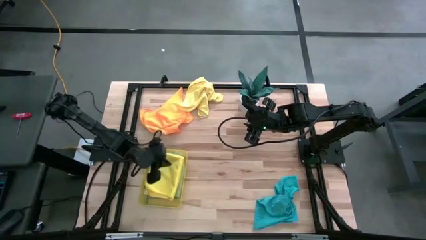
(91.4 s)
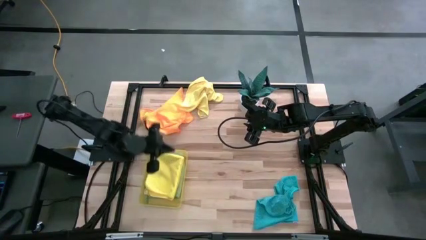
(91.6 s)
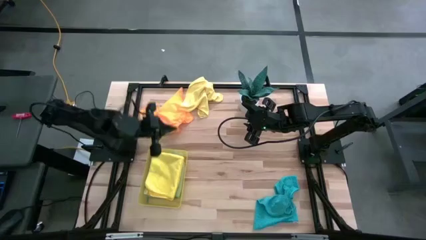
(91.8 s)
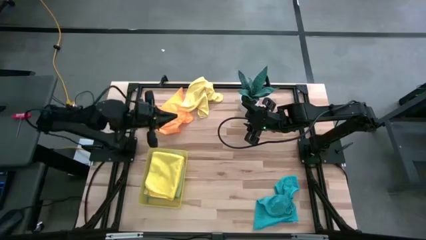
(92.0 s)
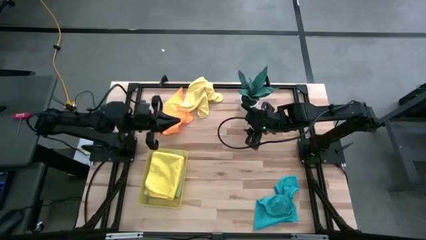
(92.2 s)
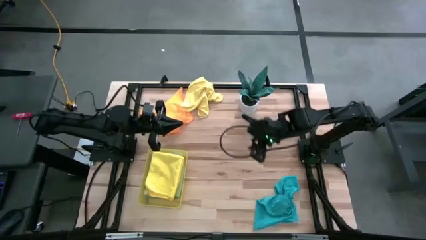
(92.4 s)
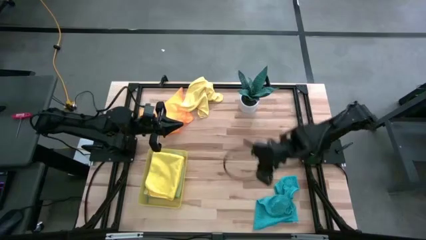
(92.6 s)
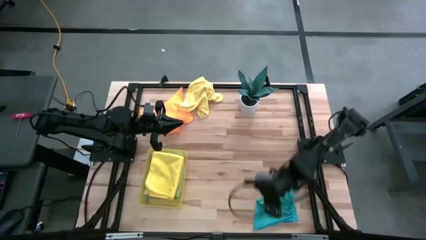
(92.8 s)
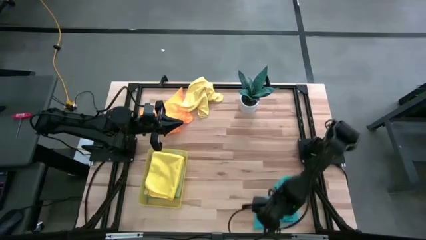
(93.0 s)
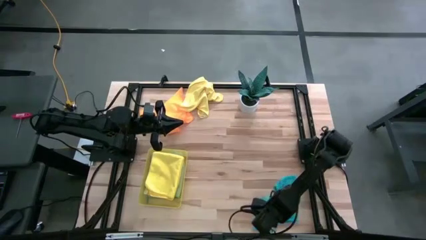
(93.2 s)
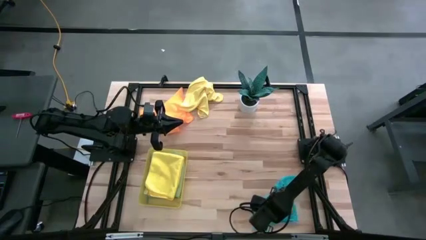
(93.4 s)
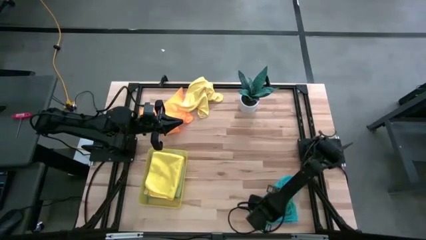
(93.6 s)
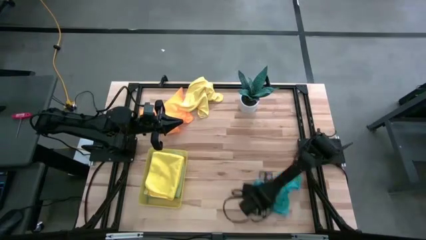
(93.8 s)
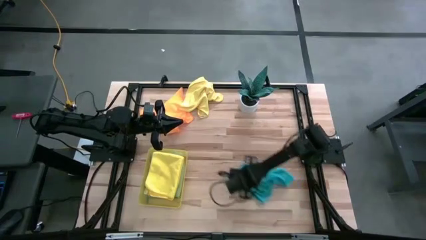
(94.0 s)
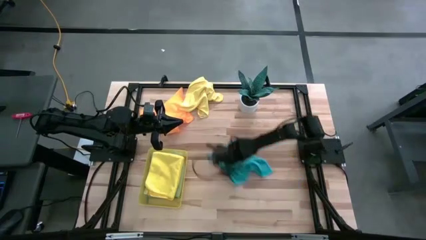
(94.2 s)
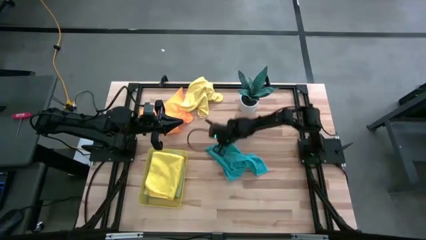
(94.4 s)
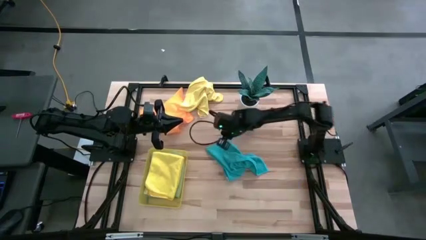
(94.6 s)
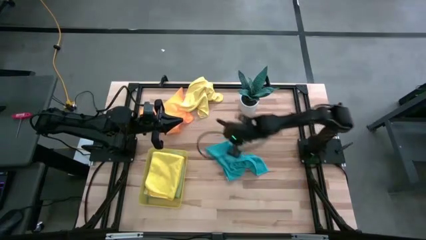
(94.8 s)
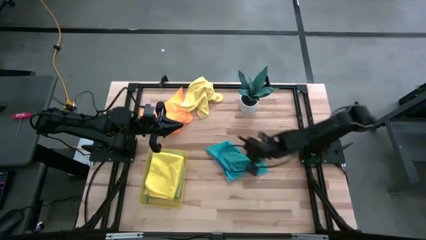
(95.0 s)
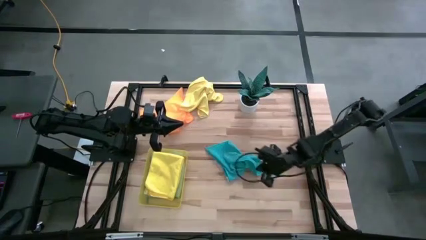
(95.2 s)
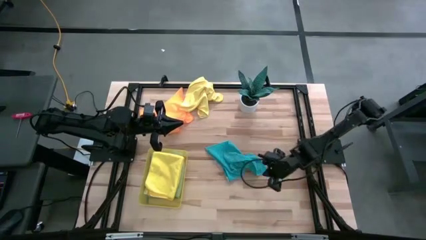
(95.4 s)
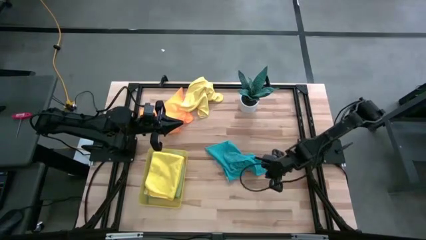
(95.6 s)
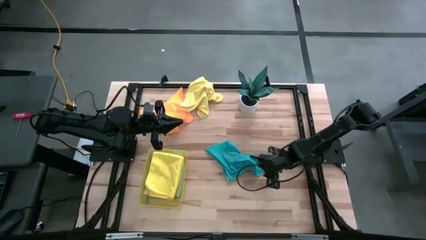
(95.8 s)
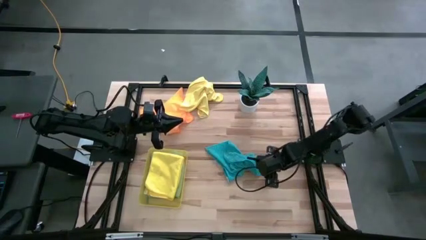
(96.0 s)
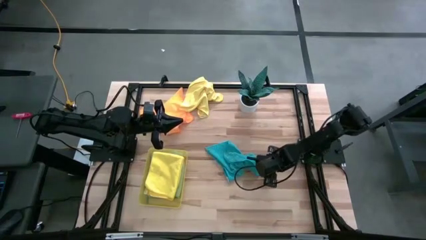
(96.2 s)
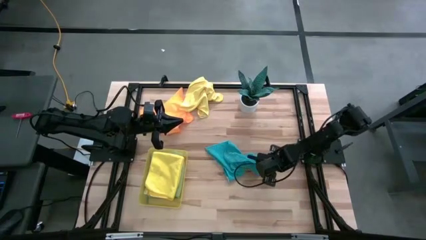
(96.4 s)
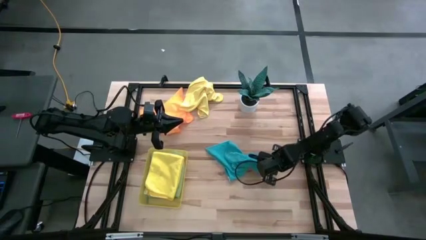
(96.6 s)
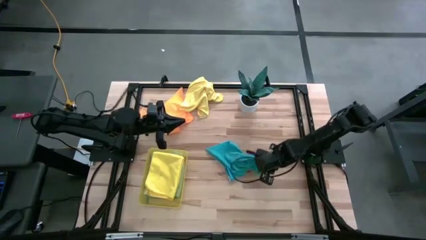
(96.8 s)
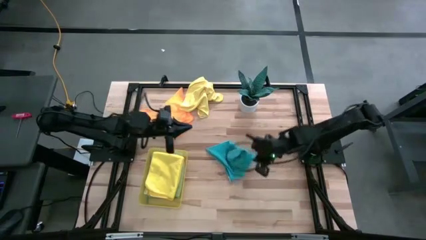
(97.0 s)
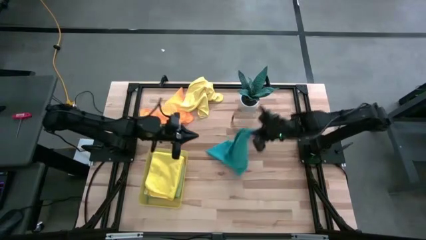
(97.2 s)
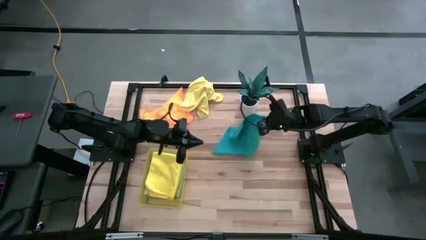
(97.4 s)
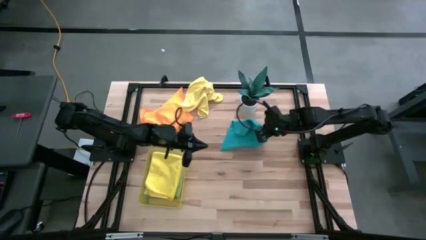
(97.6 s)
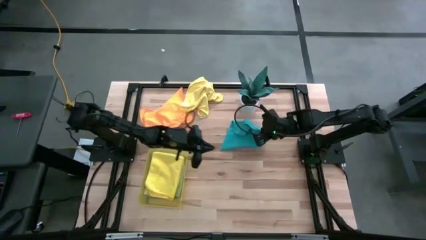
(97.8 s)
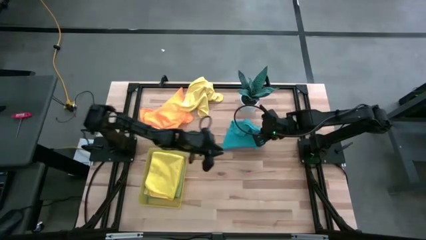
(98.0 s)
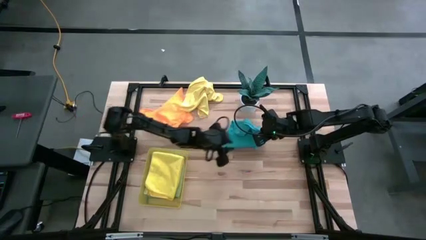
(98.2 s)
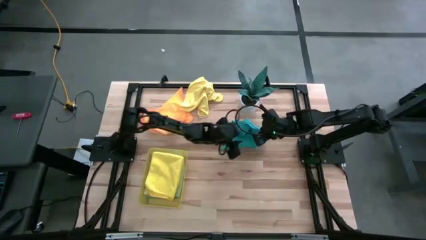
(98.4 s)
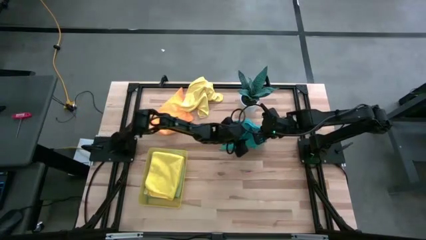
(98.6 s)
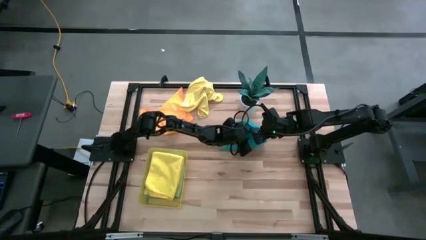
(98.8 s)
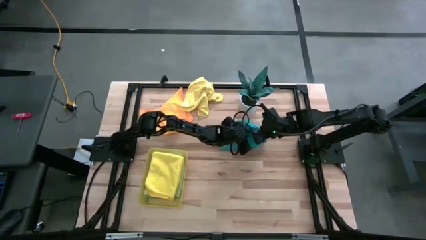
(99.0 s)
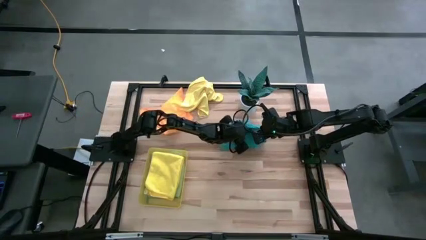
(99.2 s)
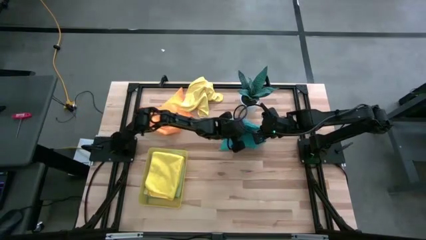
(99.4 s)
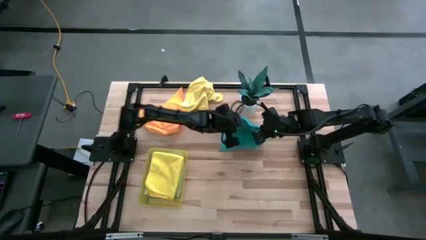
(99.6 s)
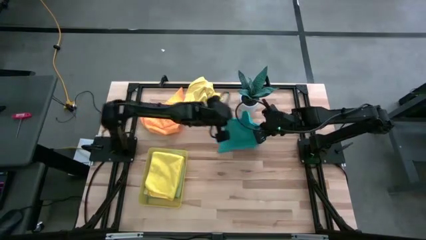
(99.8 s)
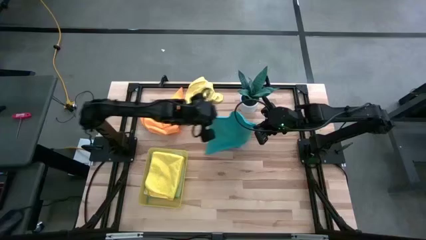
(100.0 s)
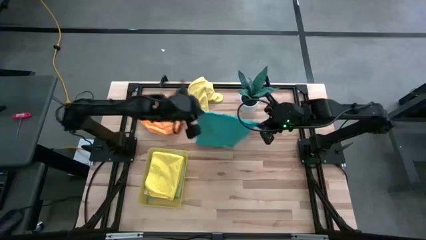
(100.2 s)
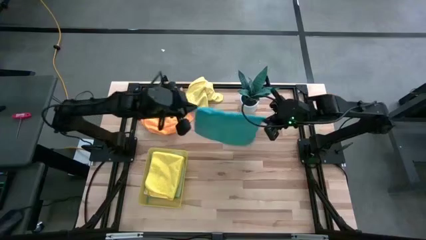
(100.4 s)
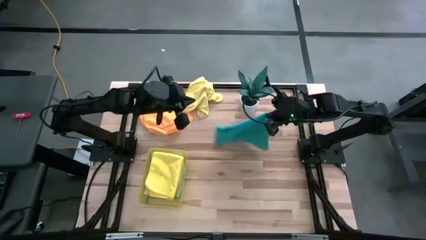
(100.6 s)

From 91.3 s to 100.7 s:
Task: Fold microfiber towels
Fold the blue microfiber cloth

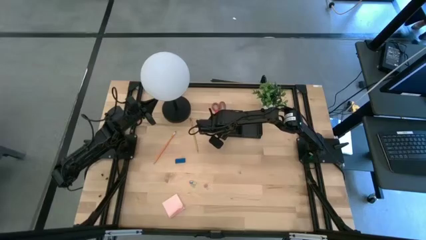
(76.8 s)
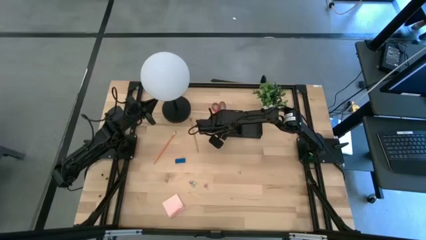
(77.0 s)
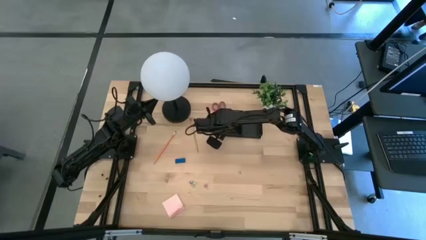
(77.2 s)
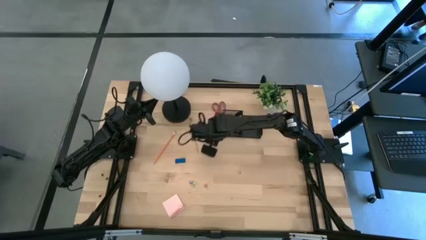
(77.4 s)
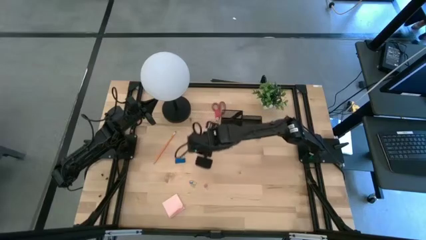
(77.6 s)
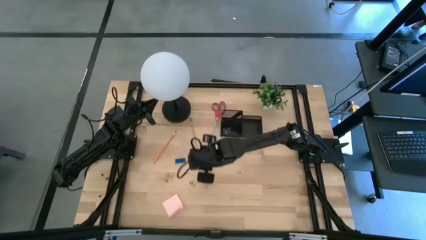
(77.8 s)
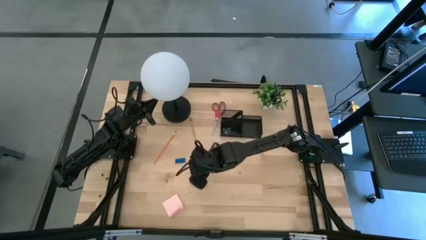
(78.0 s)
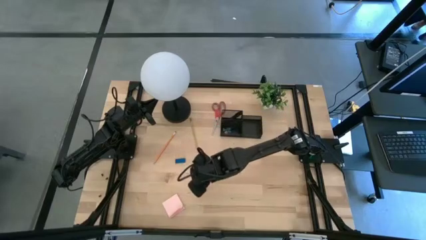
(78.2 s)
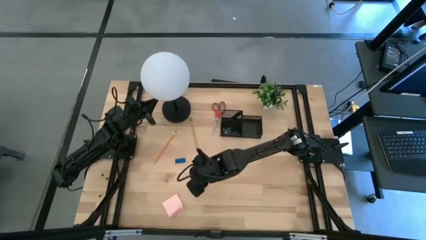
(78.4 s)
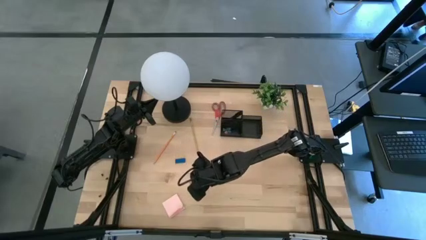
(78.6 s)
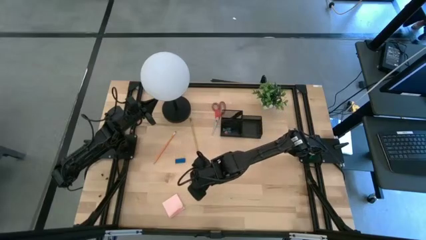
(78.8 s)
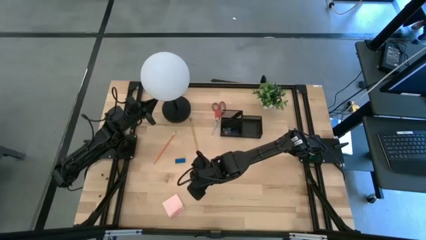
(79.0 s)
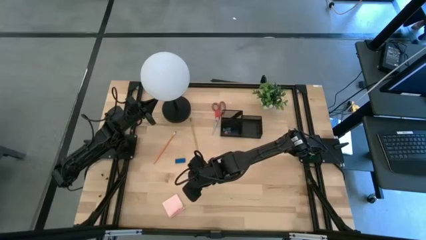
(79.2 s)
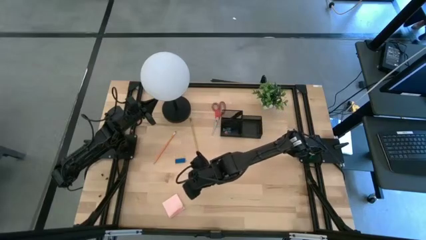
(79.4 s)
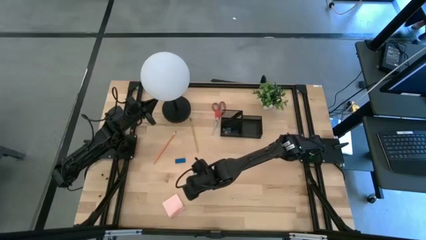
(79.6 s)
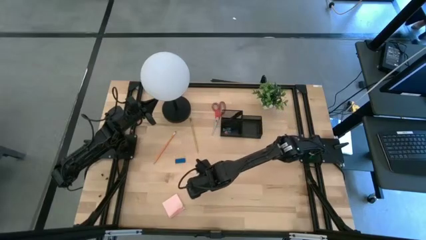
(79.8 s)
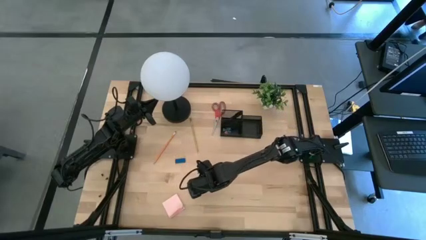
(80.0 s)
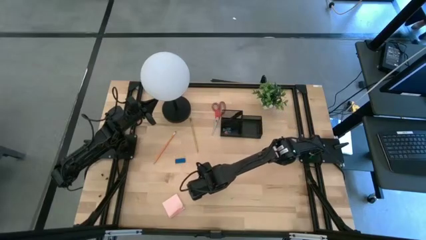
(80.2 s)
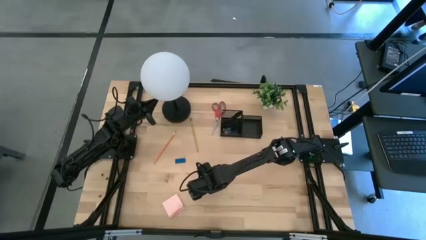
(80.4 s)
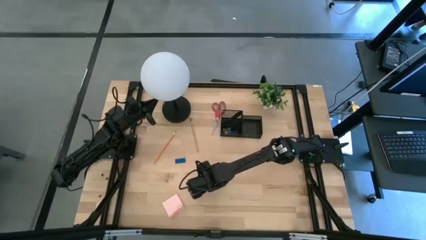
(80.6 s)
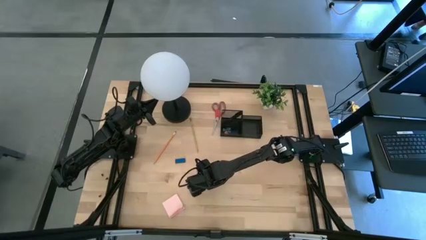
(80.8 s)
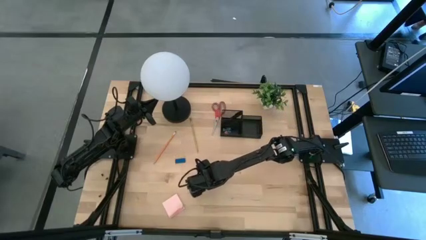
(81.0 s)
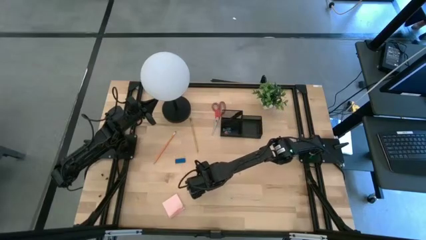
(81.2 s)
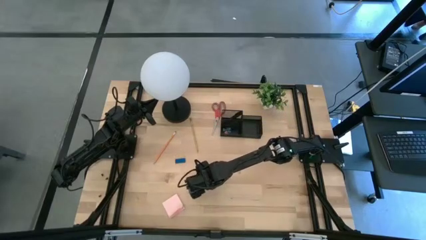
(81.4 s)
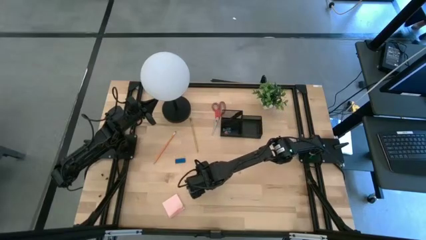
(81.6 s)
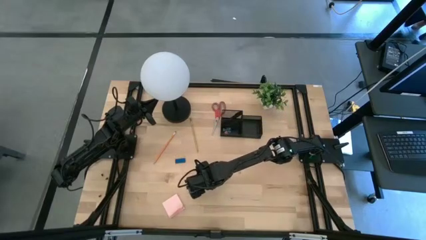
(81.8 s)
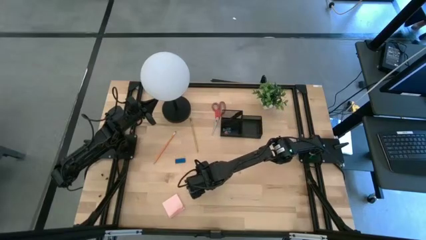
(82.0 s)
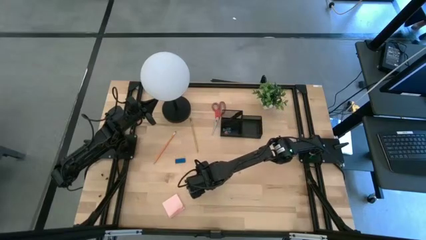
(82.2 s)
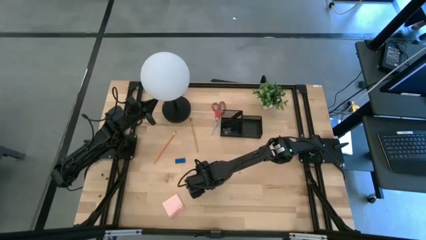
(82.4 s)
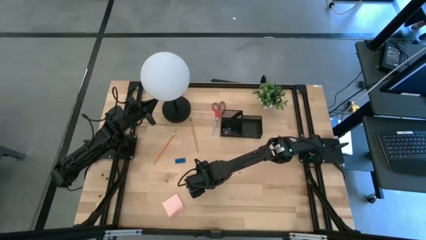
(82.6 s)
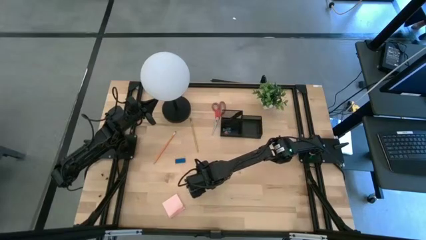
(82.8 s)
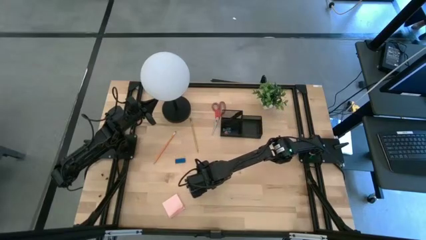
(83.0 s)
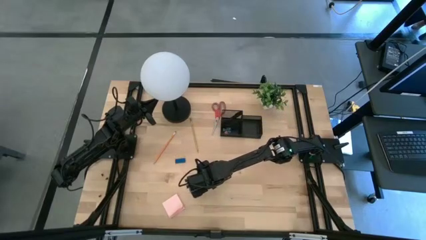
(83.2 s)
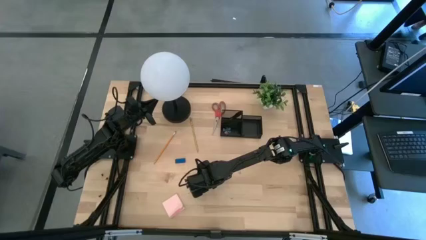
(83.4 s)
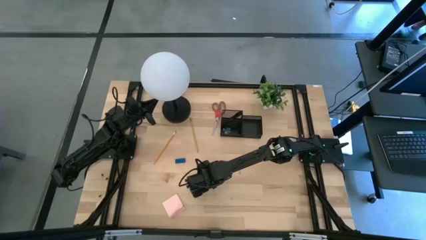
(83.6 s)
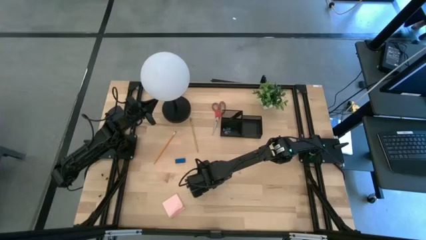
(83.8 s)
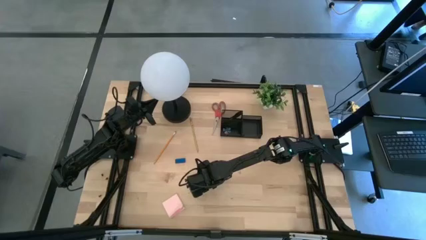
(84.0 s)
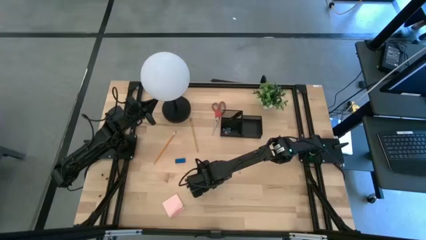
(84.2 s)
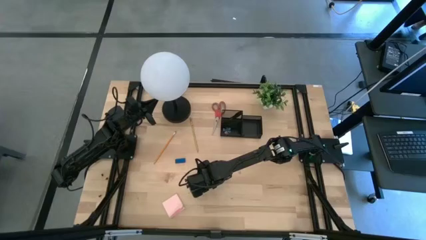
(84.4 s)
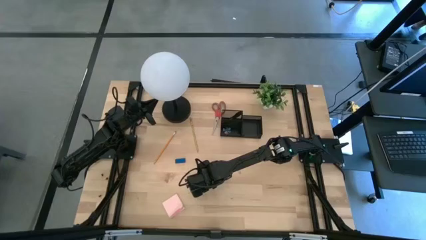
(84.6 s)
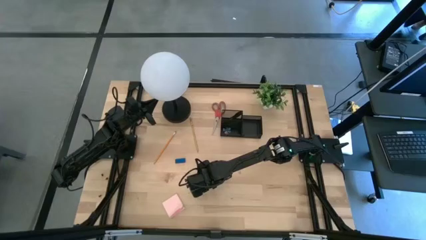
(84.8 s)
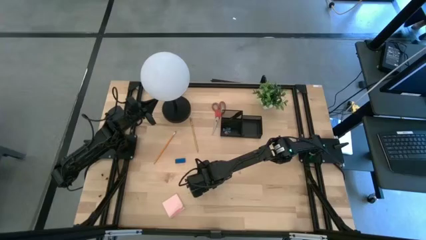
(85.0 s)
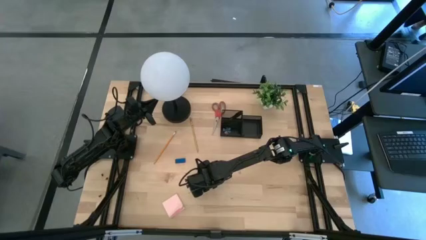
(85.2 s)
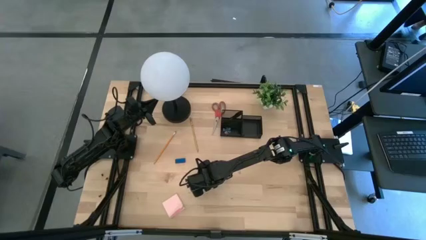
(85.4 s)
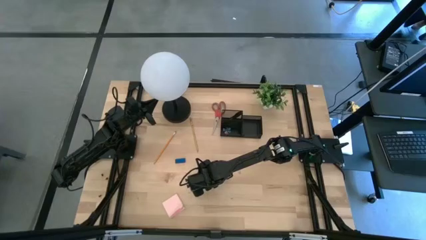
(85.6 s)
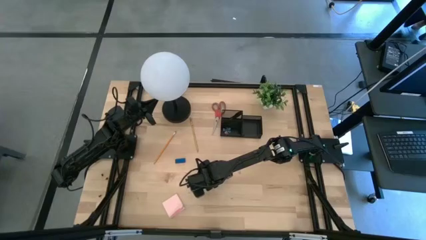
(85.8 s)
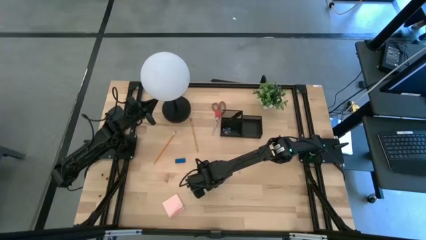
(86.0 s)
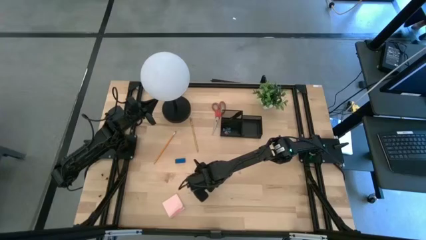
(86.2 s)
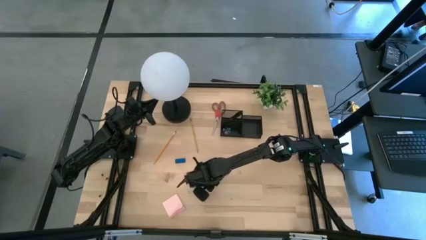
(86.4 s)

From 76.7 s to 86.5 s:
Task: Pick and place office supplies into organizer
Put the right pink clip binder into the black desk organizer
